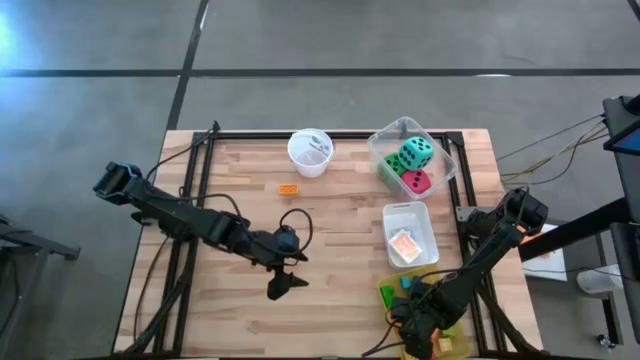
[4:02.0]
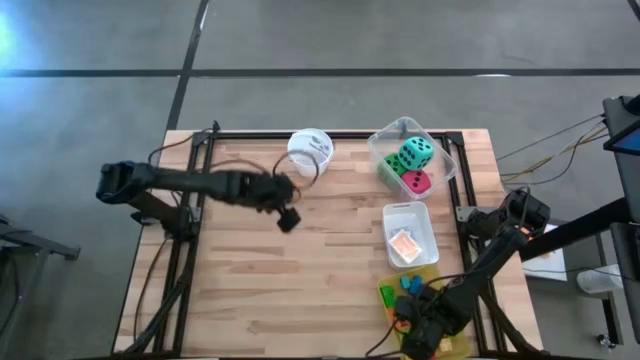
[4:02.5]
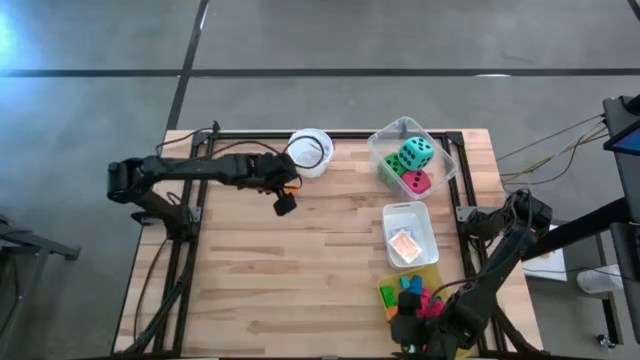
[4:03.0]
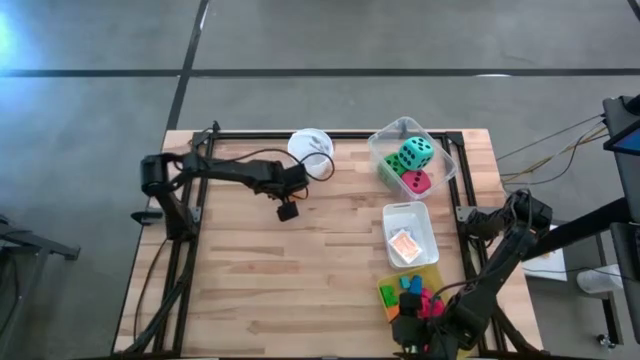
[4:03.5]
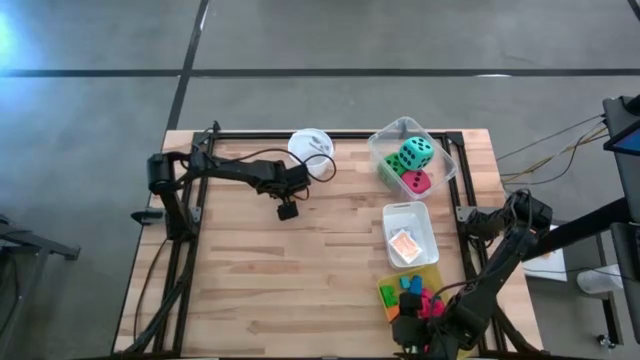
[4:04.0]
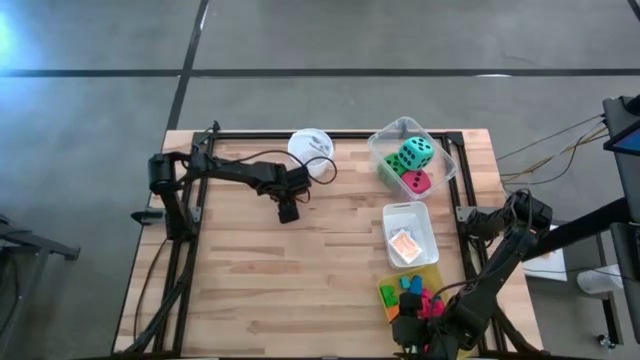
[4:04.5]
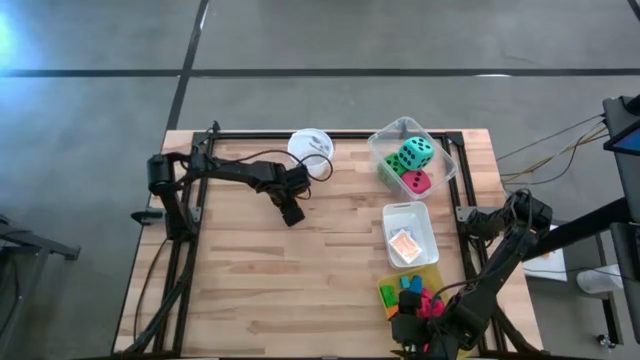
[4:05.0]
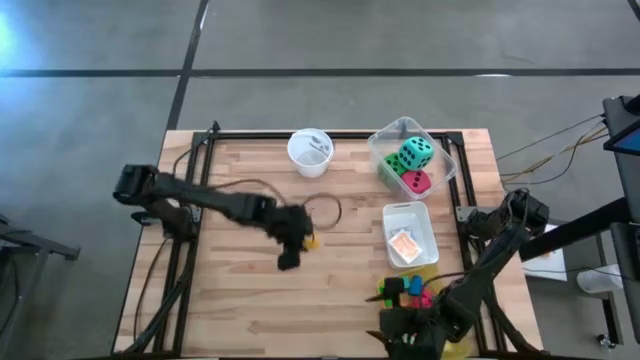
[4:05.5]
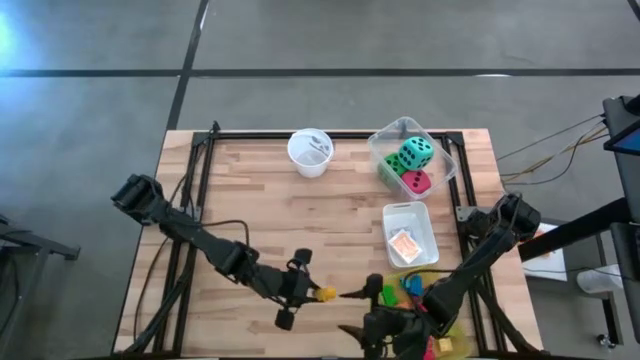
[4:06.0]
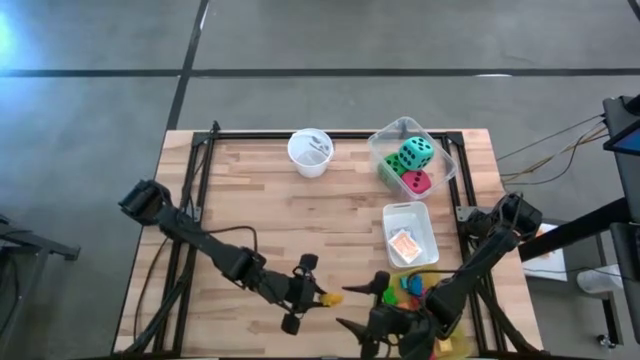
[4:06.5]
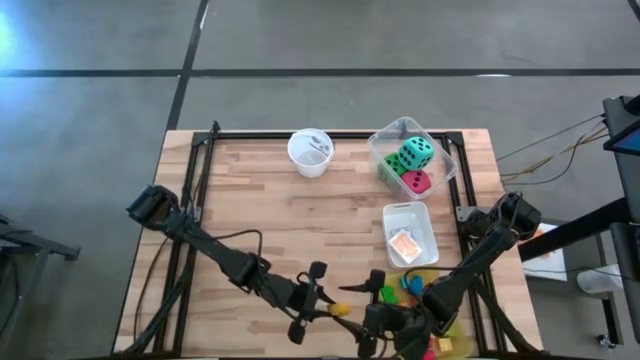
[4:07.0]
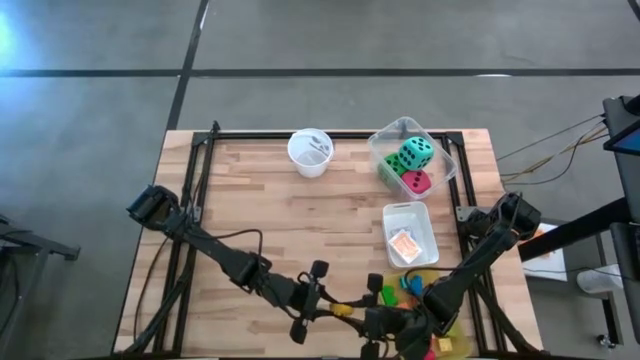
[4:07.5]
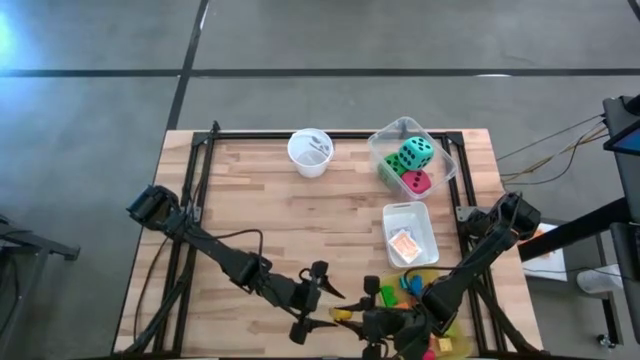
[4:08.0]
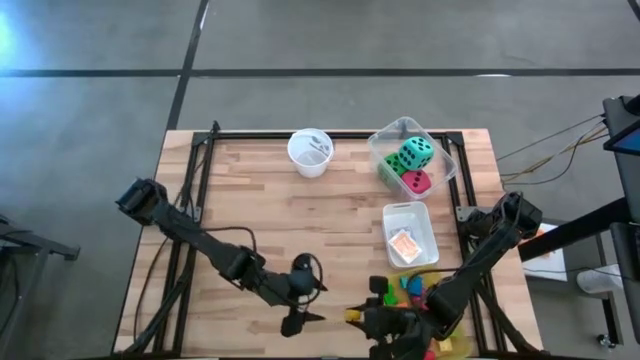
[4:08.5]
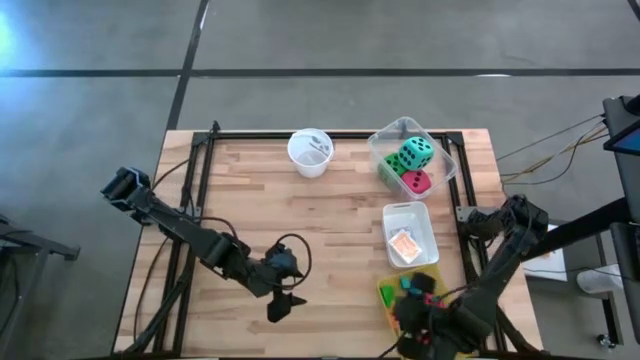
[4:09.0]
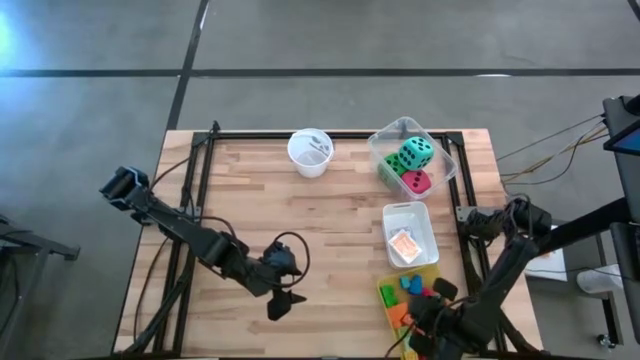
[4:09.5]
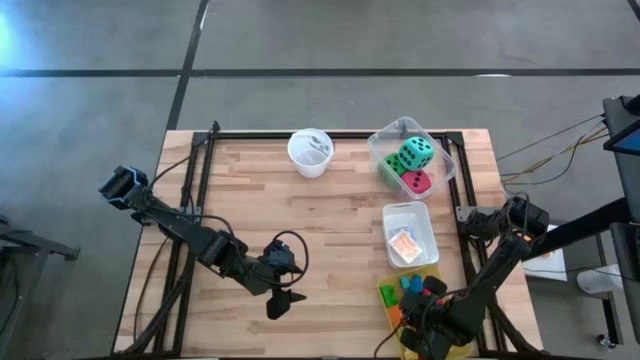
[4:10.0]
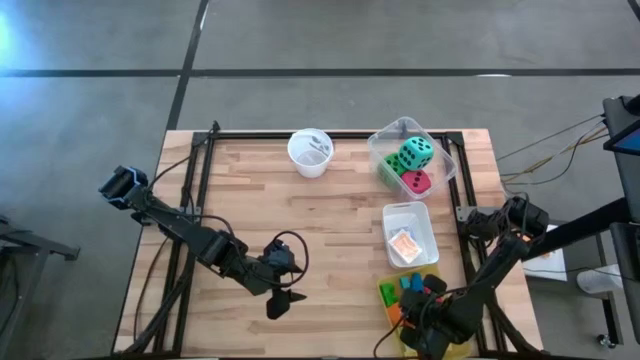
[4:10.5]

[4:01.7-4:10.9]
Task: Pick & Place Toys
Put the yellow game pieces into the yellow bin

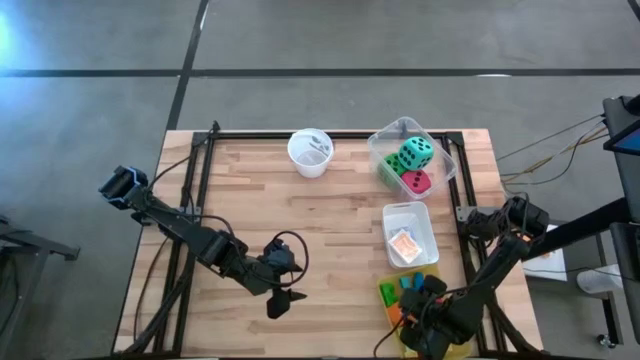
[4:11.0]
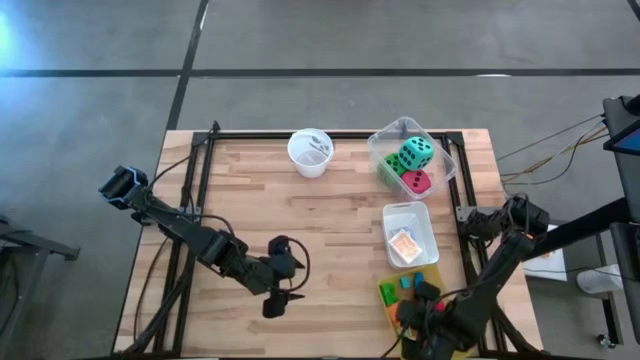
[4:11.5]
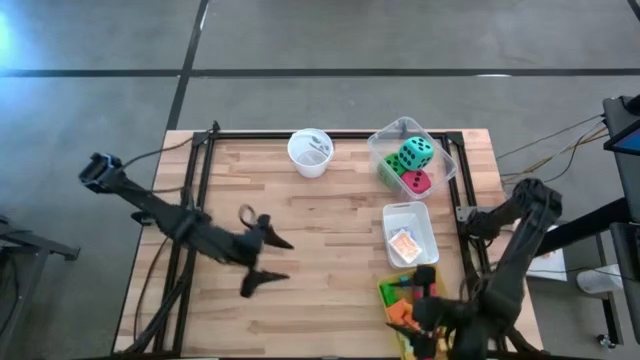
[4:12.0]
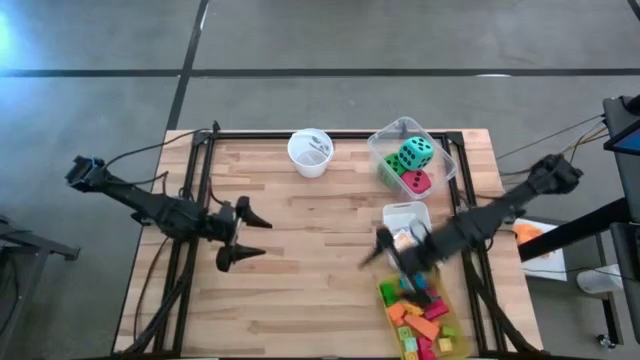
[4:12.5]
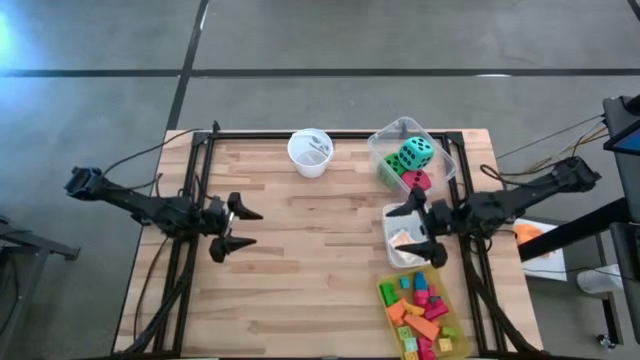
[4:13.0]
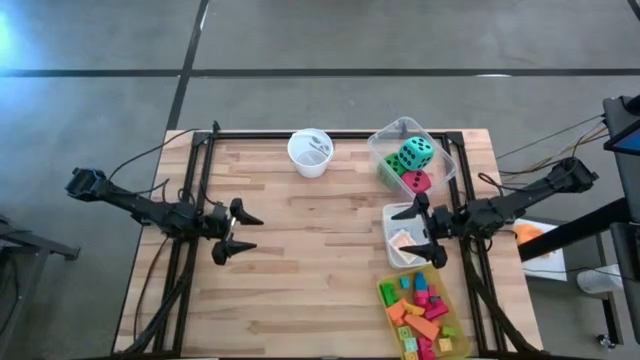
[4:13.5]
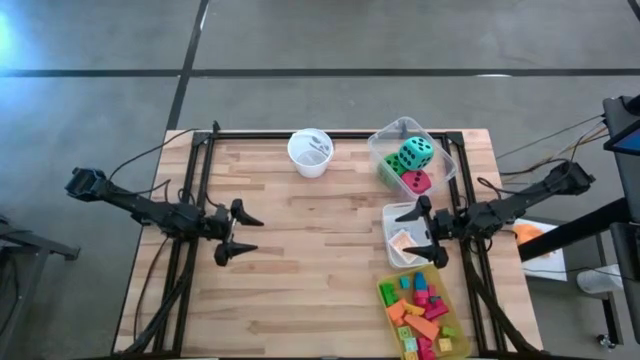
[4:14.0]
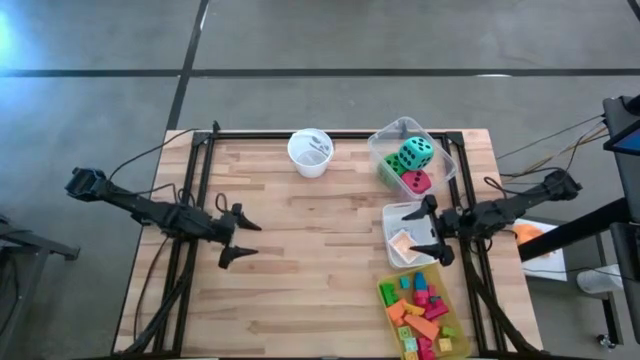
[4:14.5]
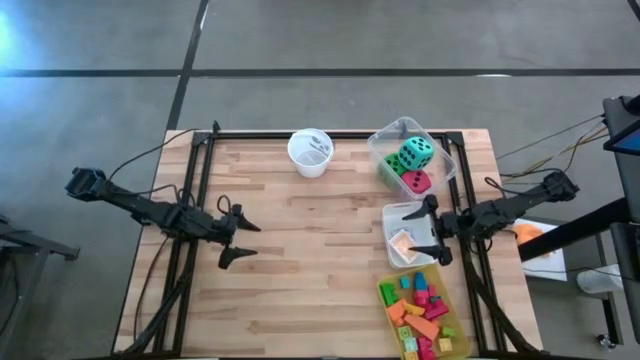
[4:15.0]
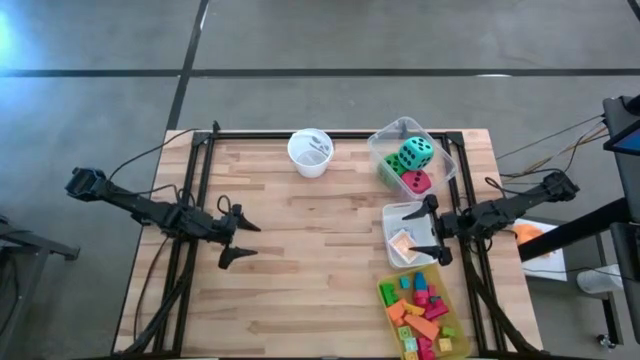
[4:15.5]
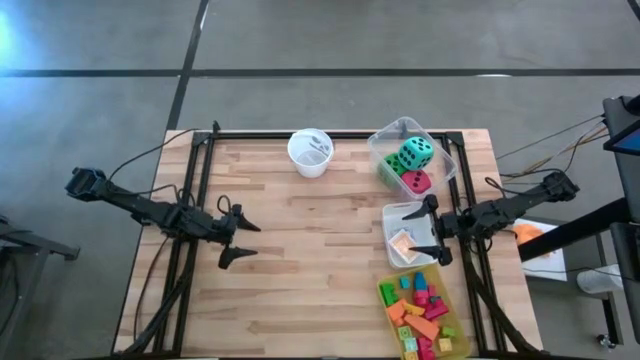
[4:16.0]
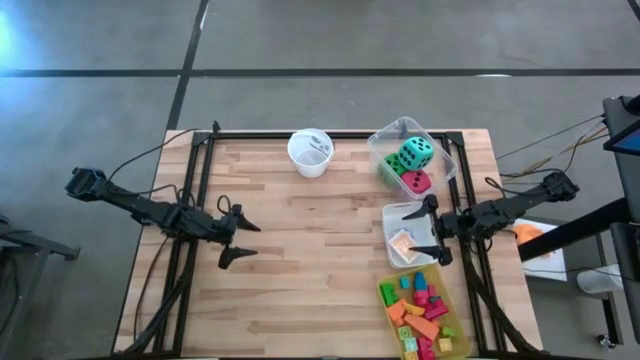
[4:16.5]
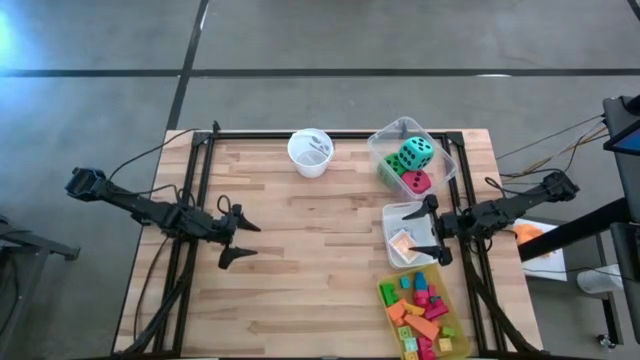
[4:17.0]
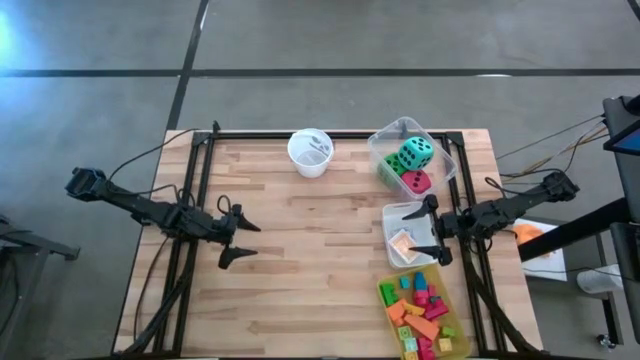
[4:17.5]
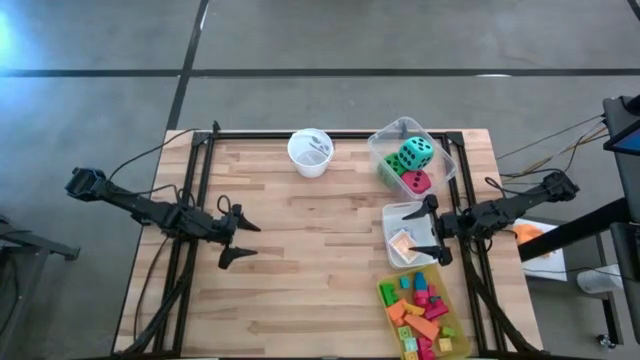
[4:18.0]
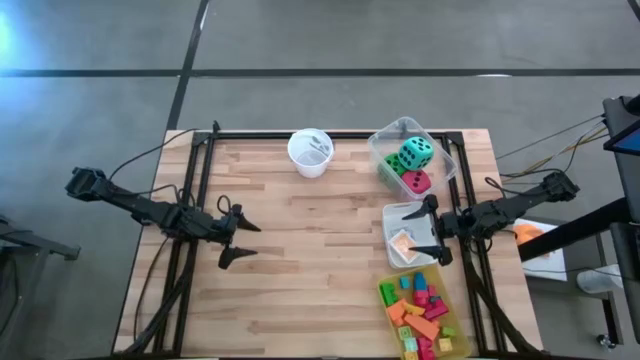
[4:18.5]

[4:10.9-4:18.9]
Return to Home Position

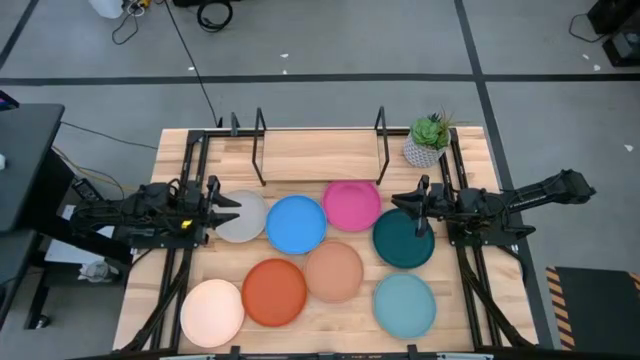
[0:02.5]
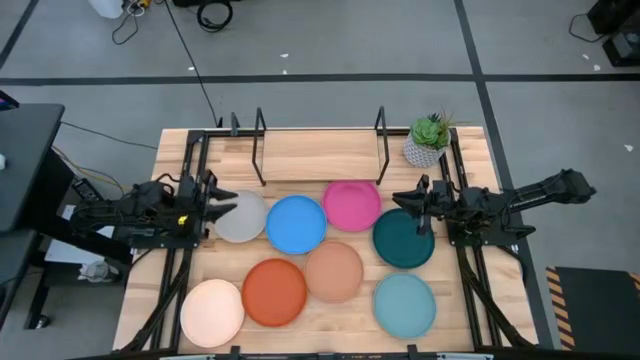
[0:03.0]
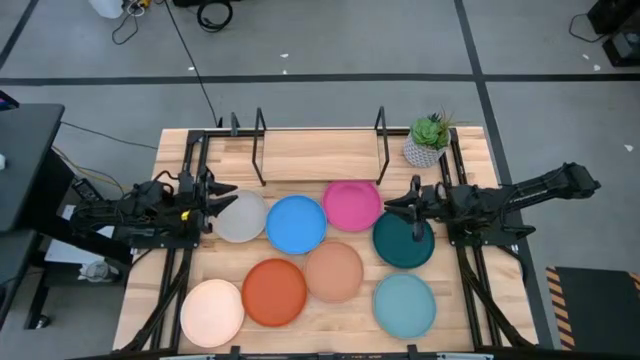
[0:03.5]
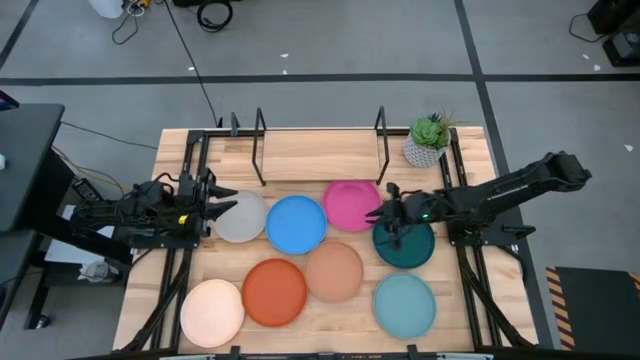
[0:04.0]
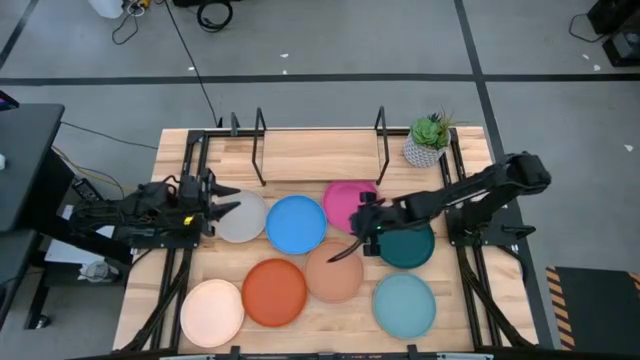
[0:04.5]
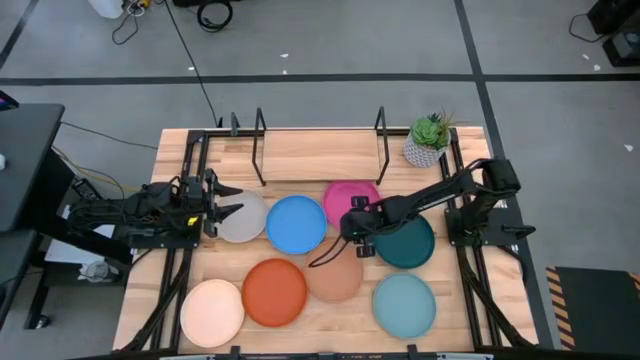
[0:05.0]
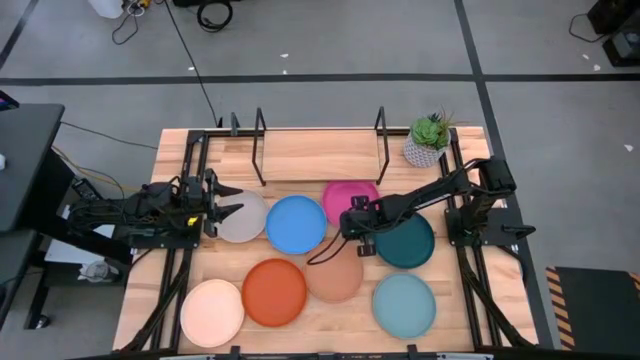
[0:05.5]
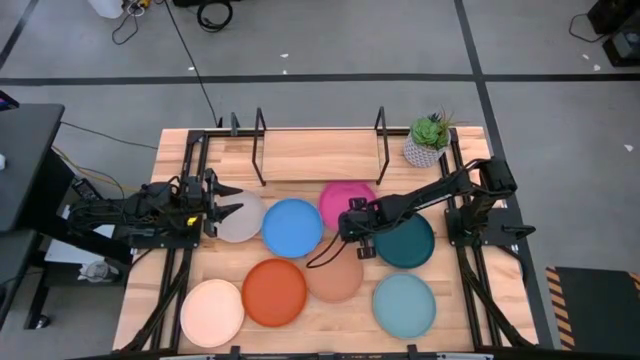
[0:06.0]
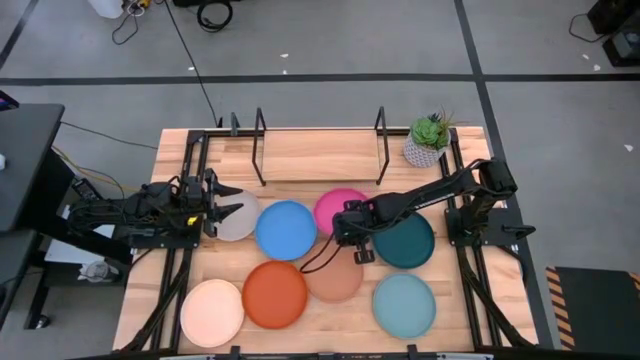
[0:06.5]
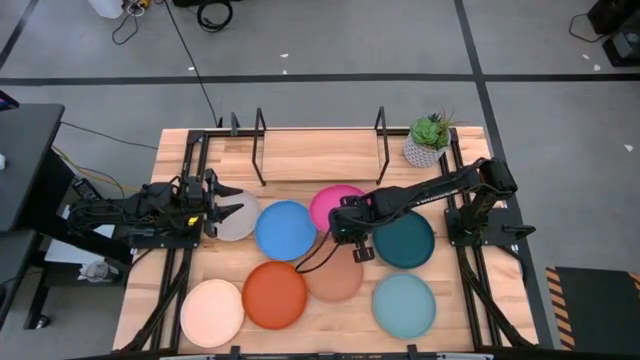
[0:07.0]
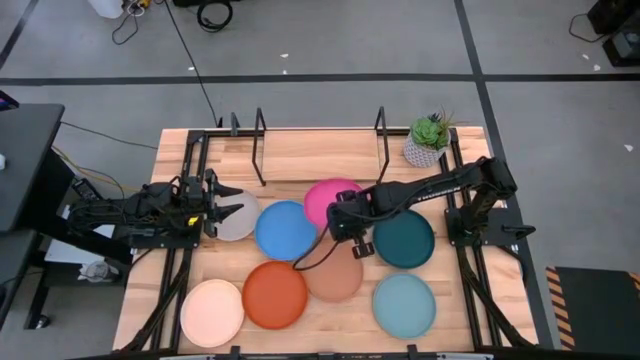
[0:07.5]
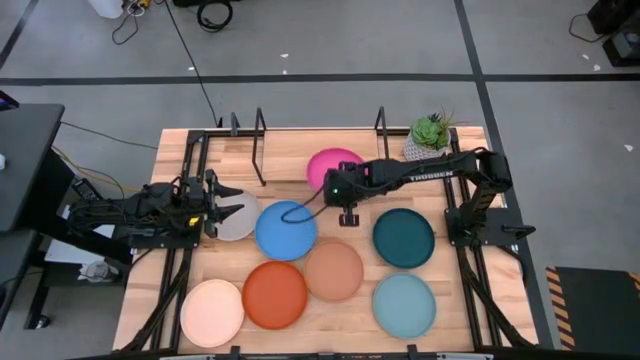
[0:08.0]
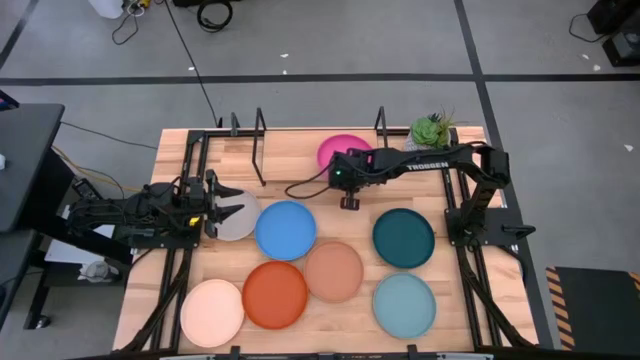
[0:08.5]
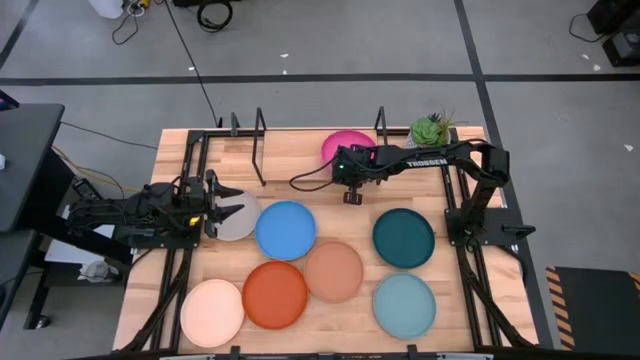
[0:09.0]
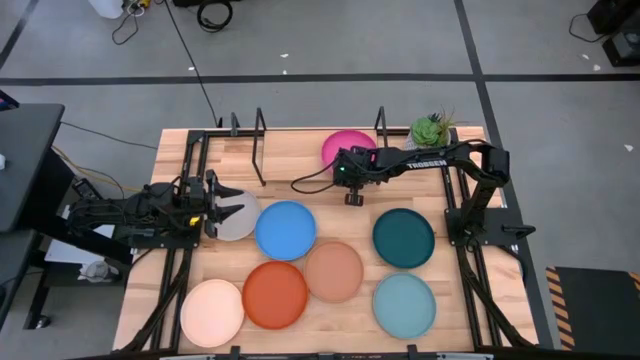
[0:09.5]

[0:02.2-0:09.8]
Task: Place and stack plates onto a shelf
Put the pink plate on the shelf
